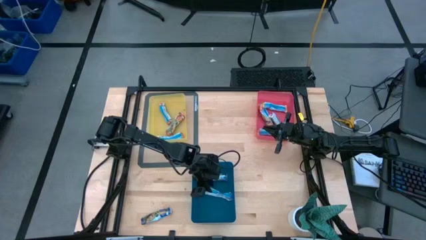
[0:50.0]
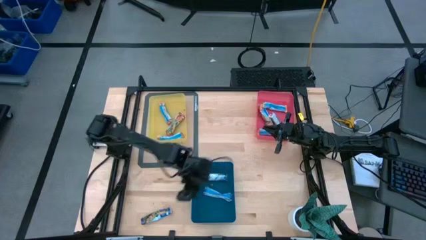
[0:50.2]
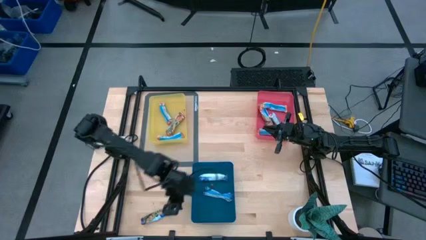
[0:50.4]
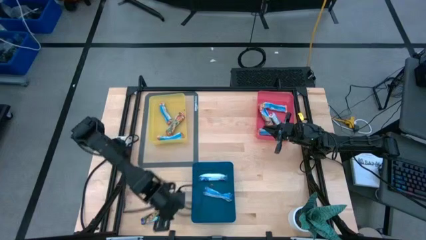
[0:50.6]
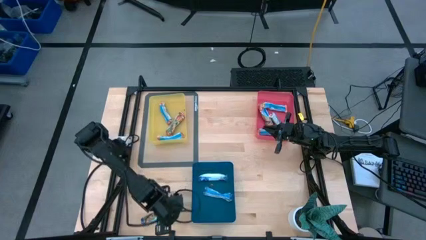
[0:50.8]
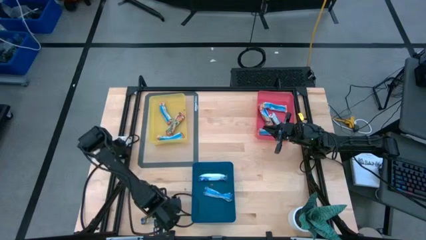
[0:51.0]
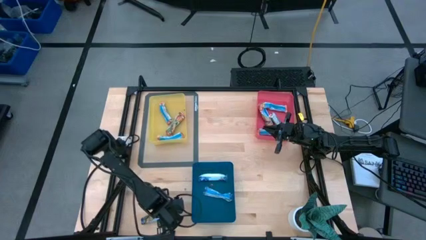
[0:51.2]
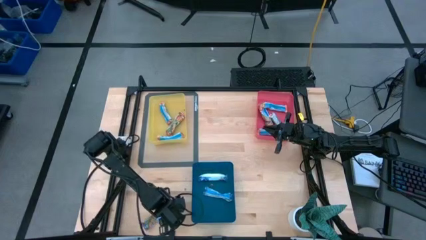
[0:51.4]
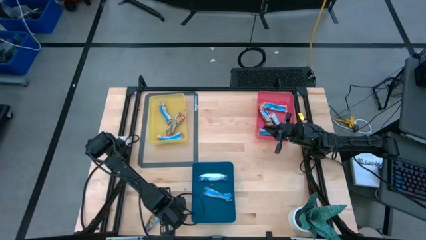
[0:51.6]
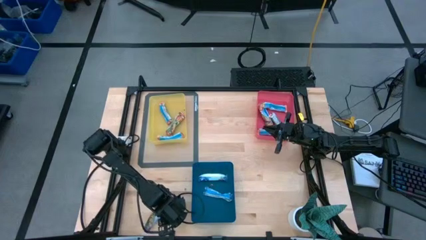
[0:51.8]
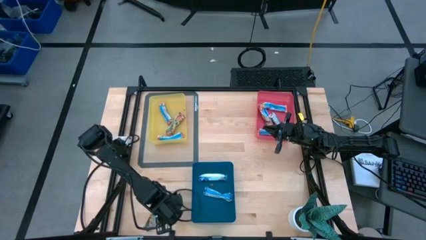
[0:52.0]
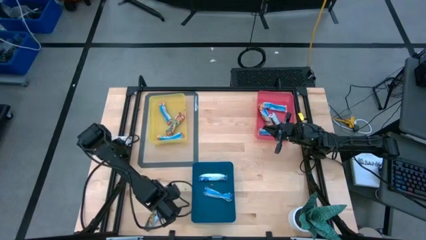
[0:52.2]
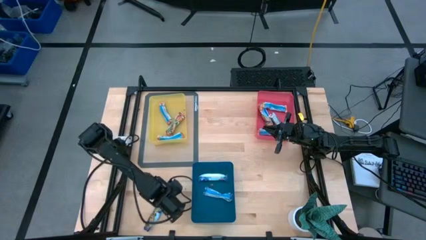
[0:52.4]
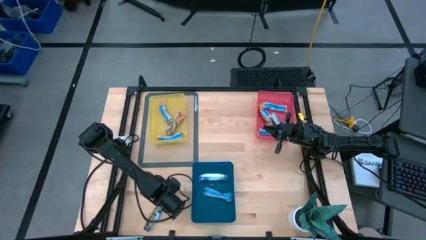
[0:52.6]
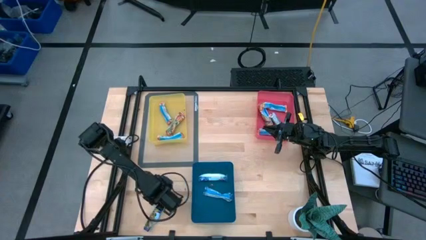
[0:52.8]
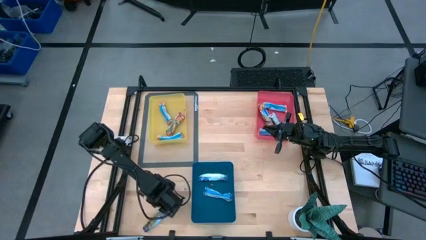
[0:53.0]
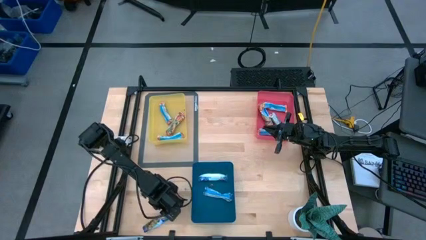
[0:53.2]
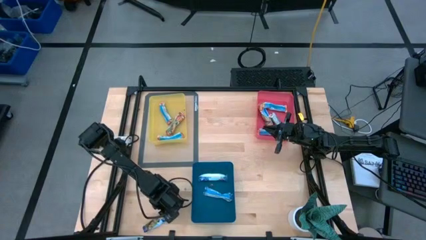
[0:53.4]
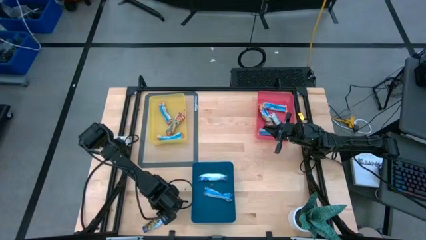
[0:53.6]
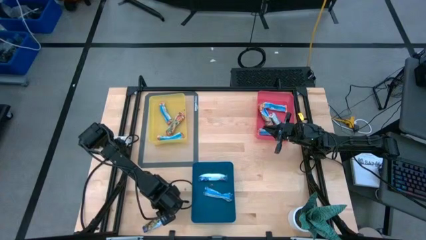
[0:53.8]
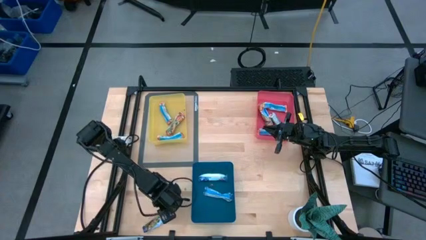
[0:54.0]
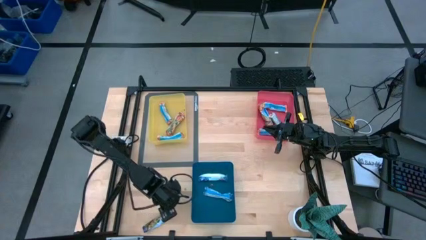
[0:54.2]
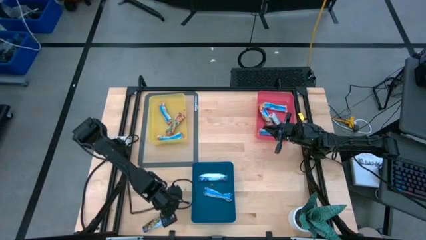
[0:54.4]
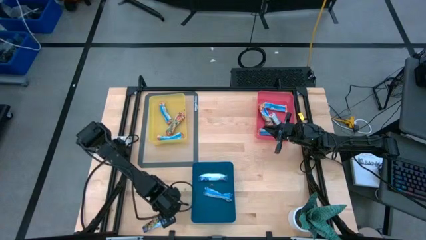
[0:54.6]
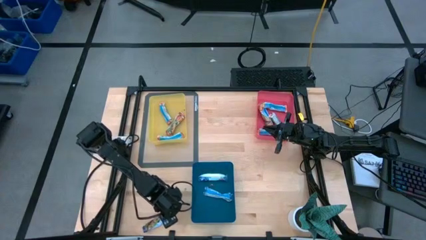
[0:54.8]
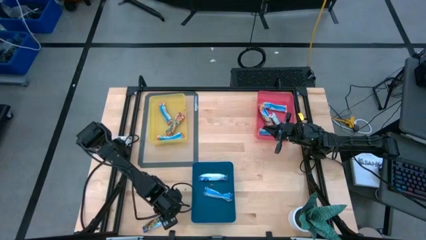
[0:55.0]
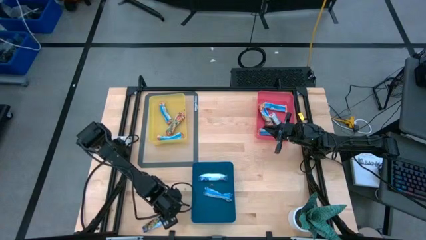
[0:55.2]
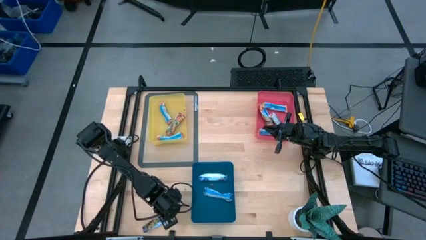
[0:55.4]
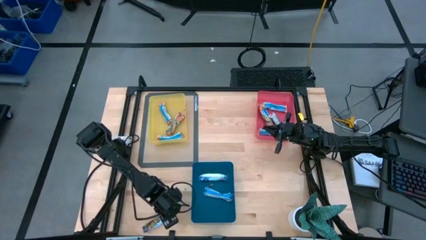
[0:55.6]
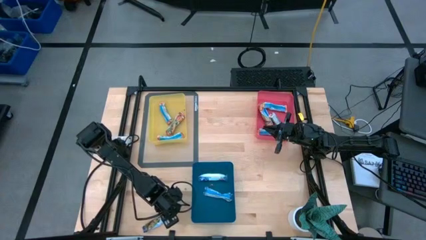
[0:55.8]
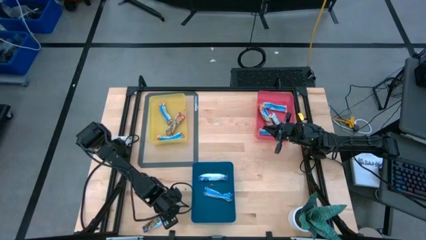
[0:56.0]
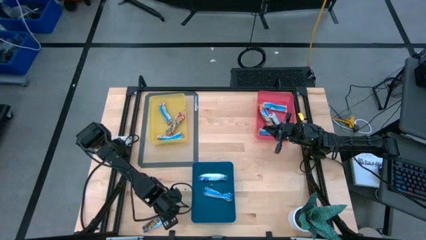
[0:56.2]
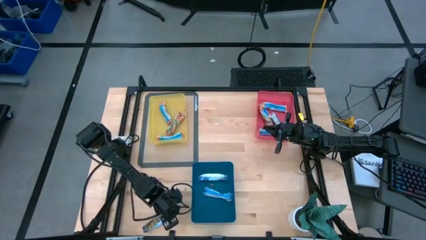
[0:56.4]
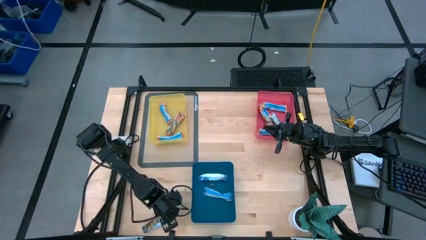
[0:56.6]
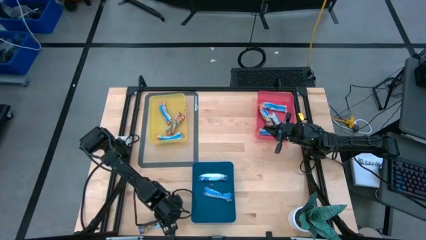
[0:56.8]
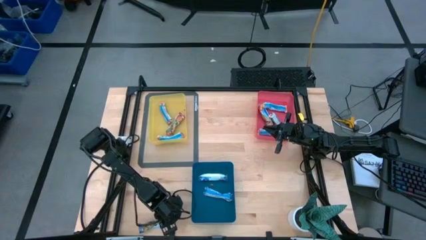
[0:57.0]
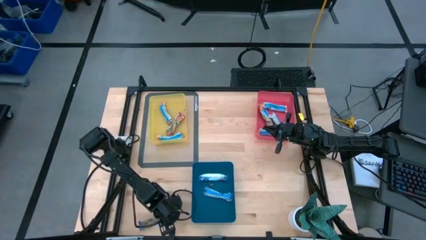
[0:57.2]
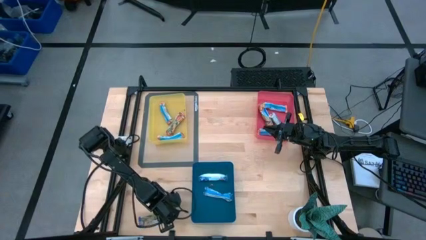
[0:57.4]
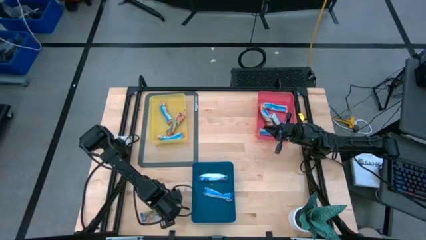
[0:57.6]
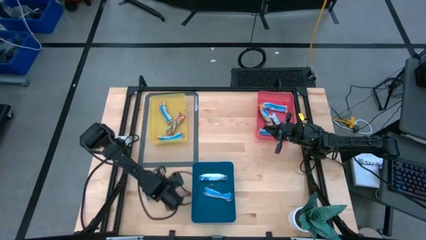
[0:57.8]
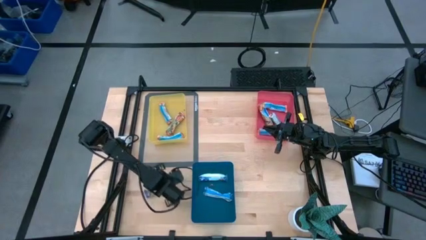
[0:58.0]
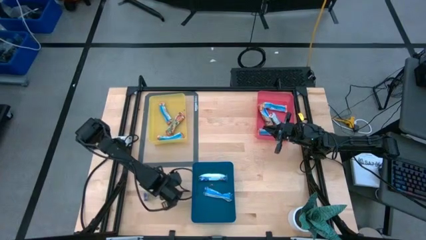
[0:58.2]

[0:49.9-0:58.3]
Task: Pick and place Granola Bars by type
Put the blue granola bar into the blue bin

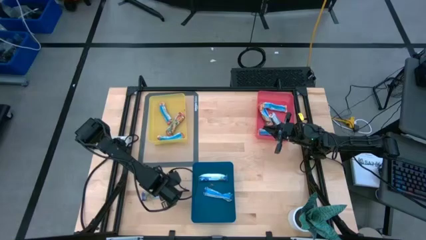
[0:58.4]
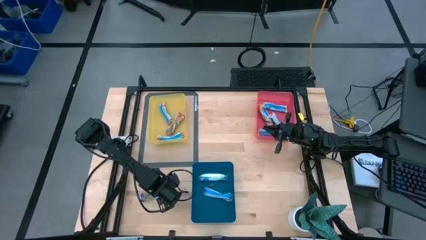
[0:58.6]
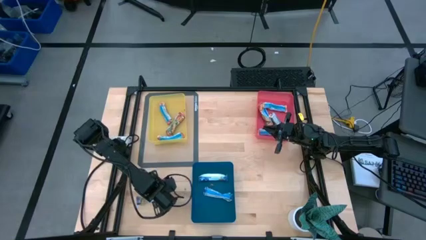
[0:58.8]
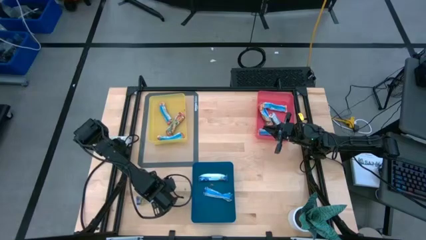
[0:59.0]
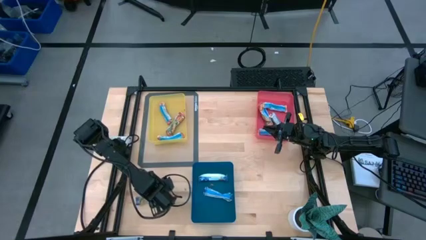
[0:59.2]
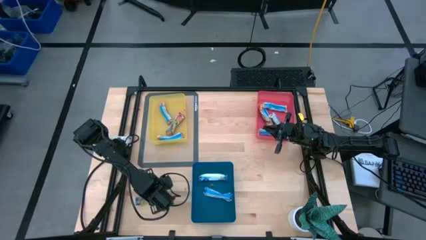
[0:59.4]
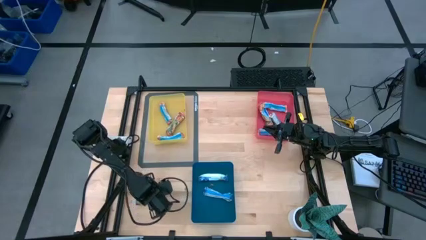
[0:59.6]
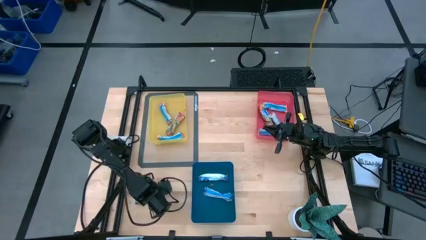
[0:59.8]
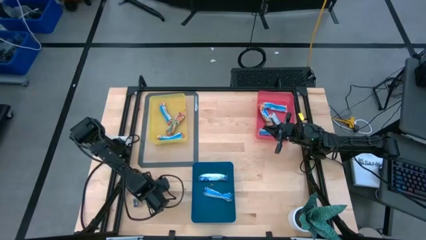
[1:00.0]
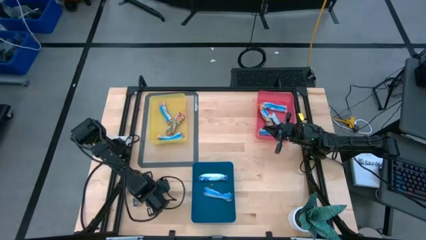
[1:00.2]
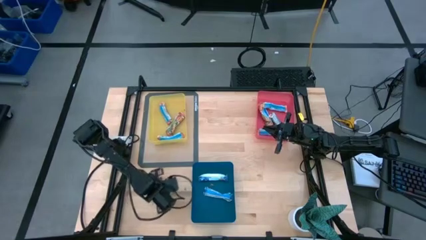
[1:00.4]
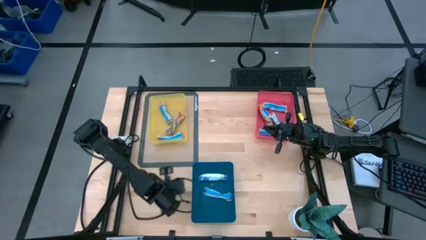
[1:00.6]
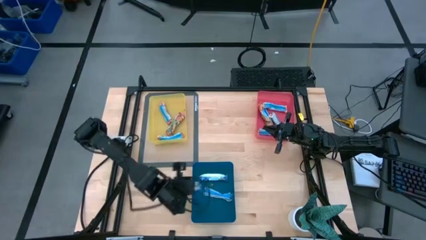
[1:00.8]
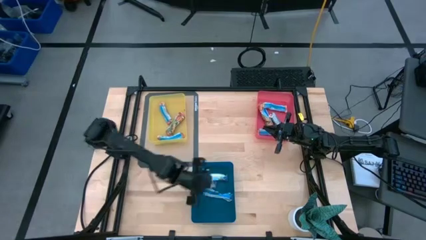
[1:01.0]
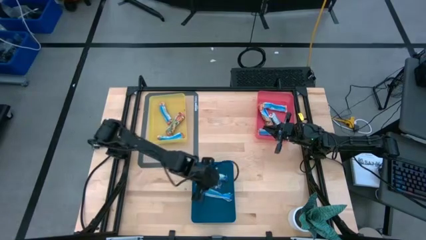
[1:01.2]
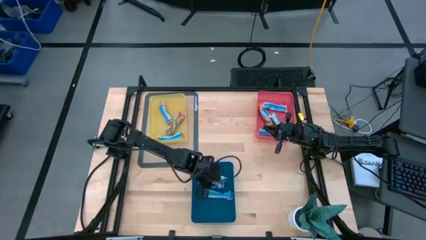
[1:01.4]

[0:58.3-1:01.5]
Put the blue granola bar into the blue bin

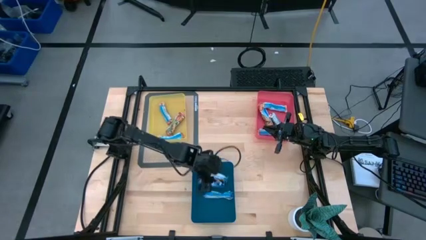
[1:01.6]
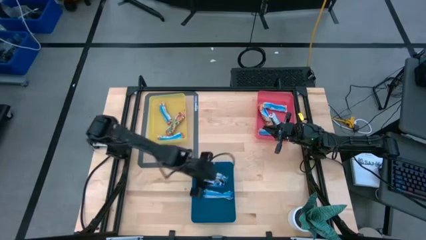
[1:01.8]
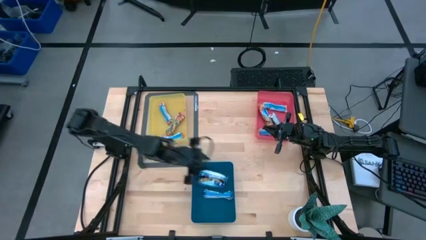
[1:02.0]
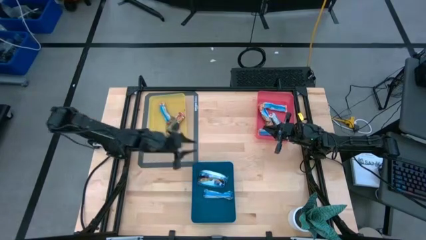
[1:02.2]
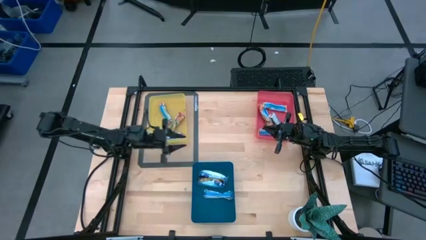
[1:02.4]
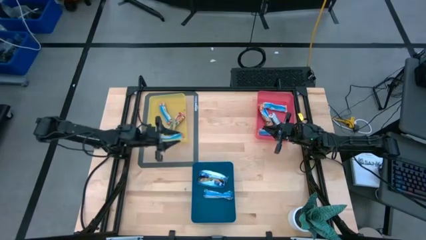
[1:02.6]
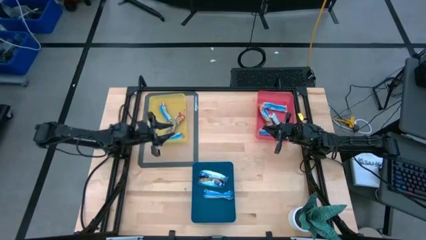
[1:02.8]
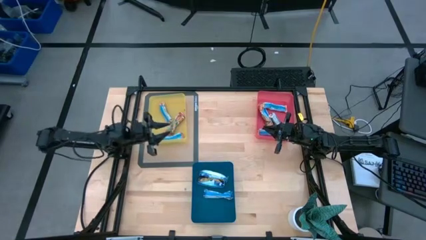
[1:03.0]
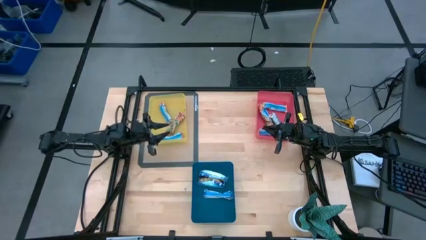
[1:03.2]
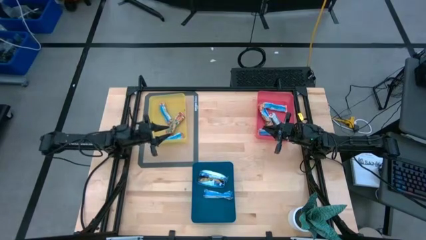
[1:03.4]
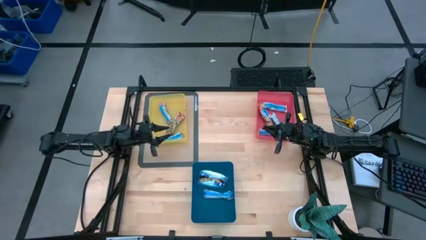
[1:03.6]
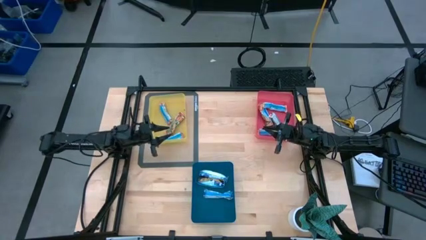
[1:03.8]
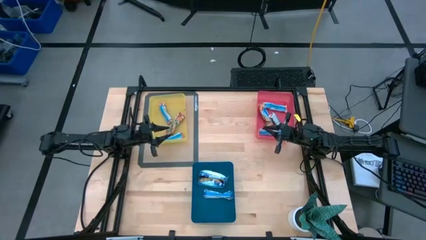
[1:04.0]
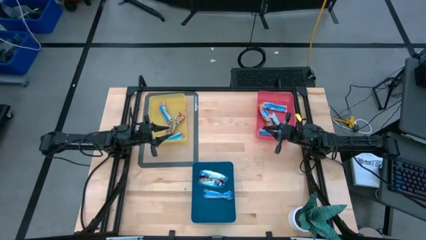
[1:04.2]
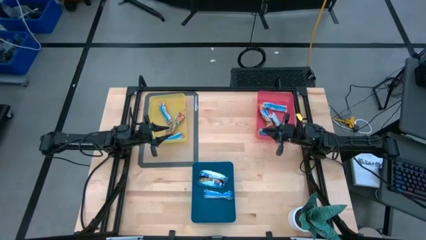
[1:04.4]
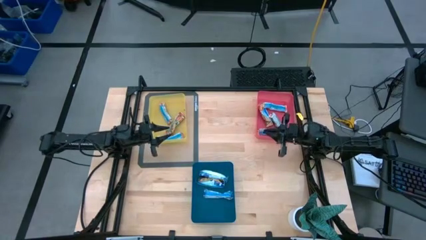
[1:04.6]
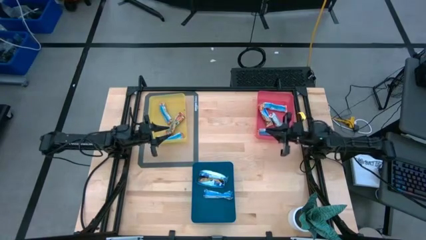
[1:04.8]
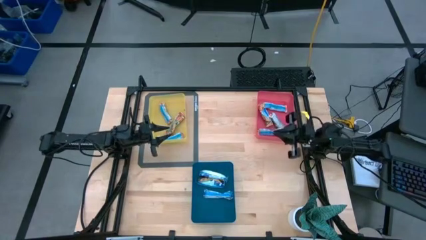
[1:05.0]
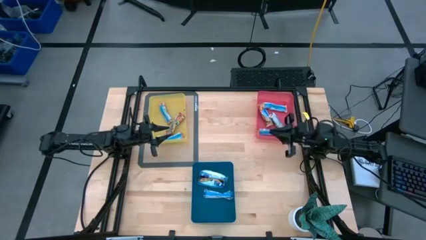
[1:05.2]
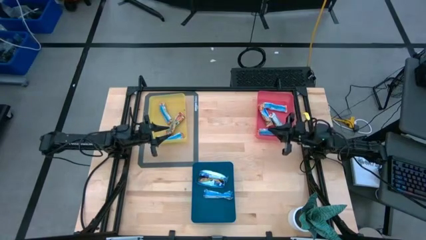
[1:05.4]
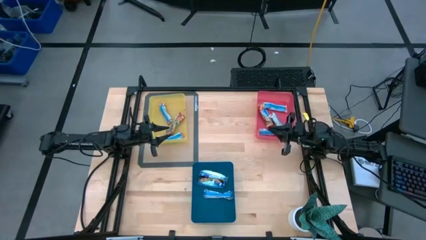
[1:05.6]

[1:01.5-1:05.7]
Return to Home Position

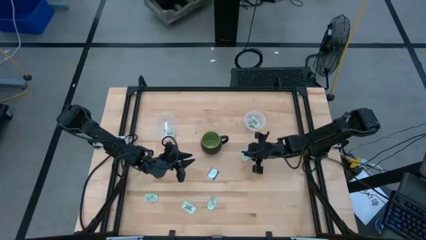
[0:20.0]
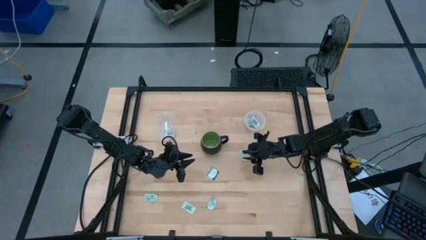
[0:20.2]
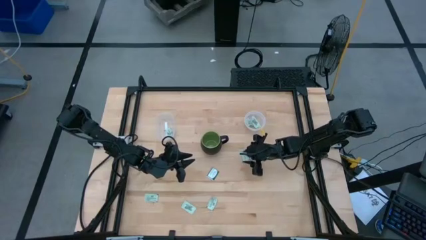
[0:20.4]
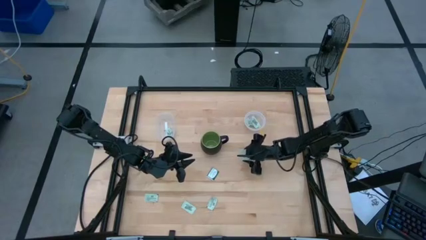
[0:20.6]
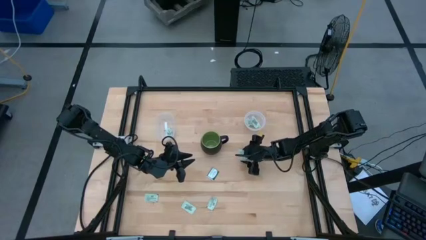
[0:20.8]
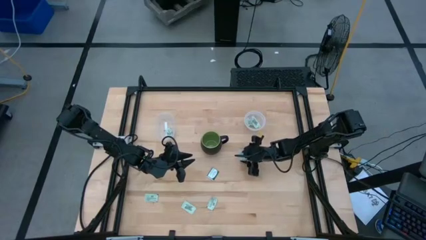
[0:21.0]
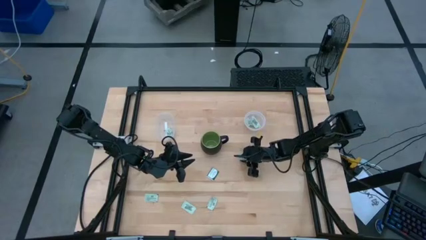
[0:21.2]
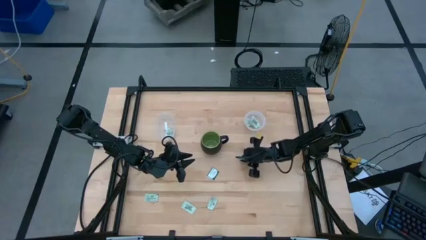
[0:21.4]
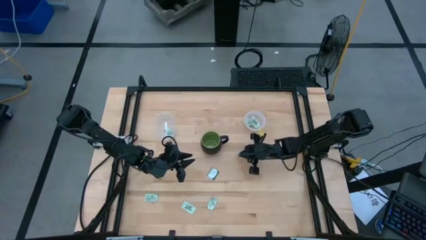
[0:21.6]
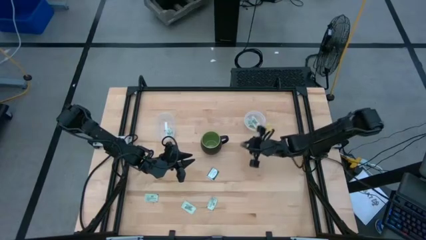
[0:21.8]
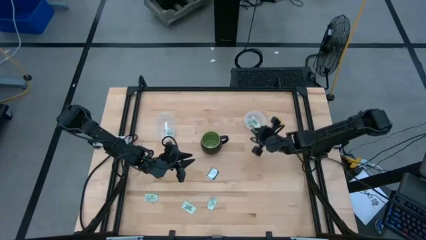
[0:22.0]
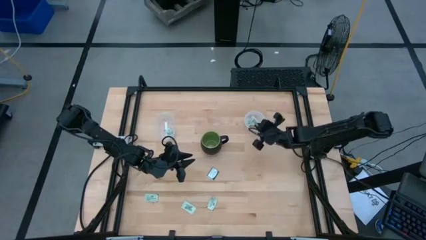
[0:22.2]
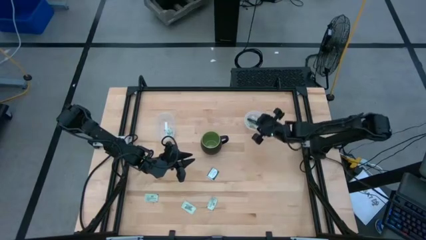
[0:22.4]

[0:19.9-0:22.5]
Task: Pick and place items into bin
Put the green stevia packet into the right transparent bin
